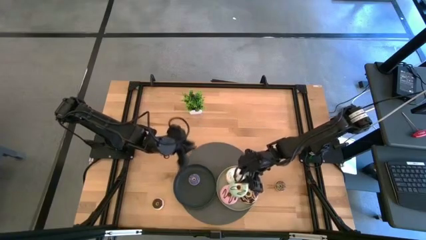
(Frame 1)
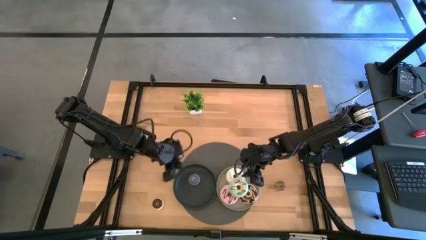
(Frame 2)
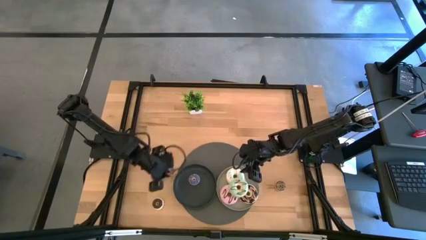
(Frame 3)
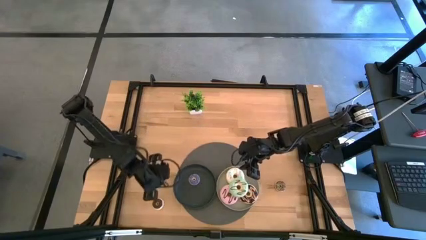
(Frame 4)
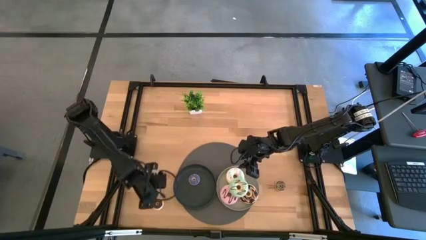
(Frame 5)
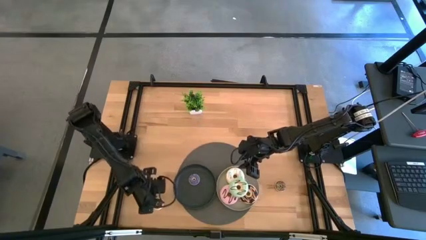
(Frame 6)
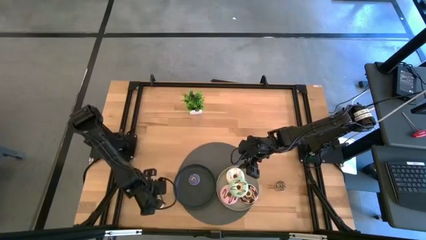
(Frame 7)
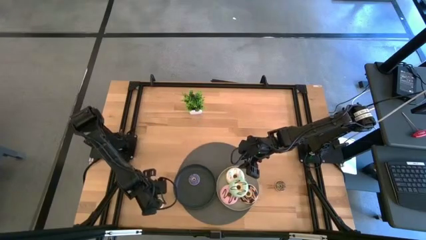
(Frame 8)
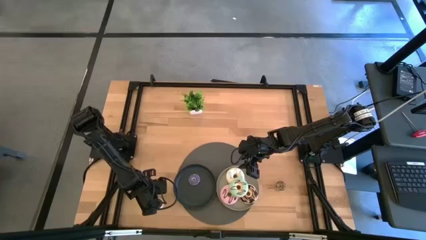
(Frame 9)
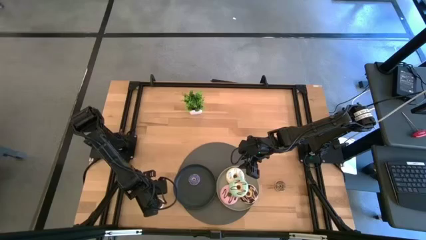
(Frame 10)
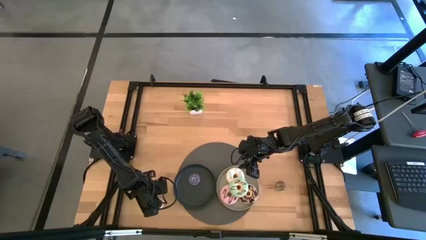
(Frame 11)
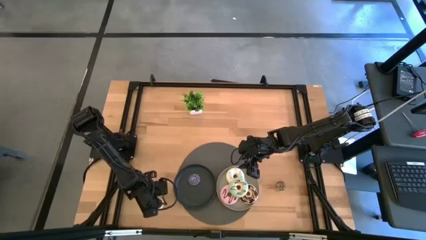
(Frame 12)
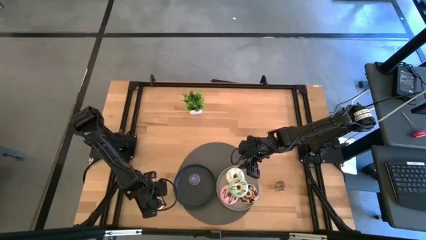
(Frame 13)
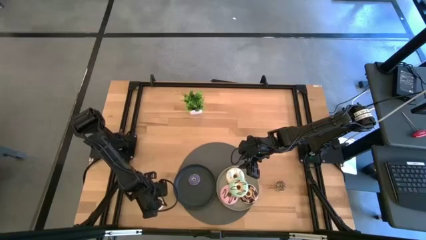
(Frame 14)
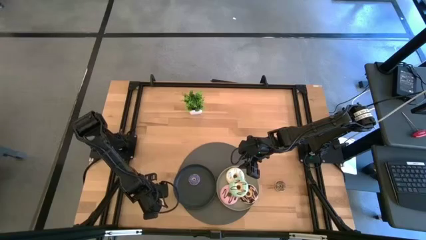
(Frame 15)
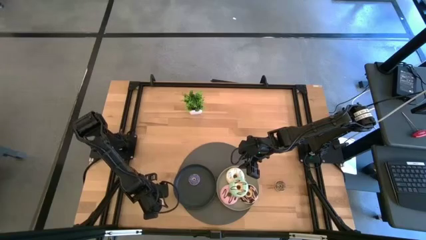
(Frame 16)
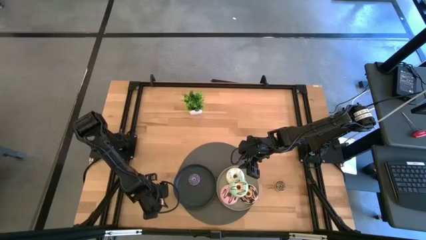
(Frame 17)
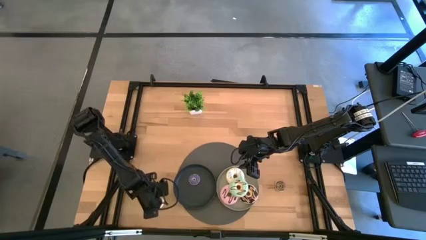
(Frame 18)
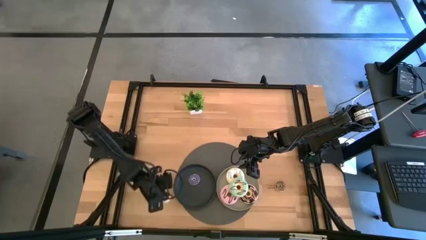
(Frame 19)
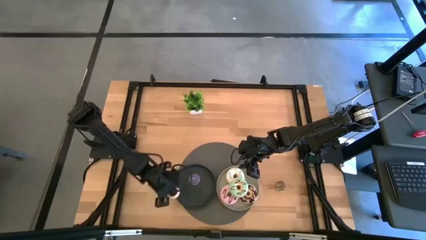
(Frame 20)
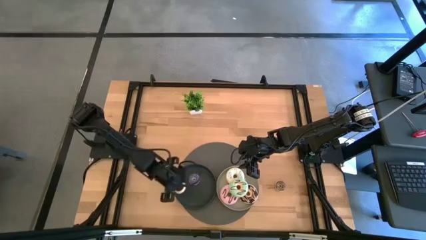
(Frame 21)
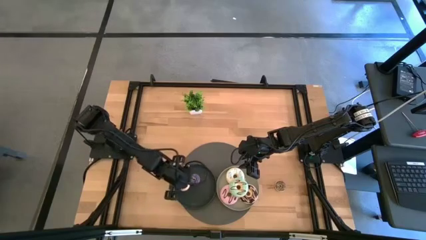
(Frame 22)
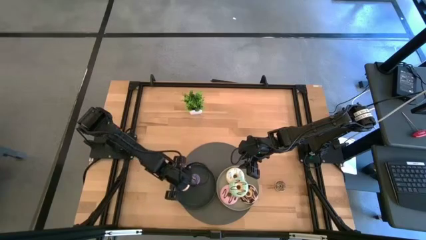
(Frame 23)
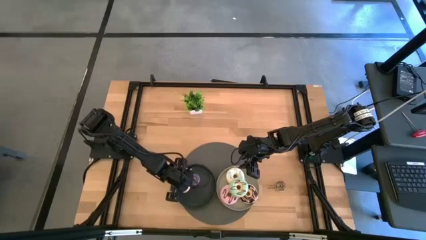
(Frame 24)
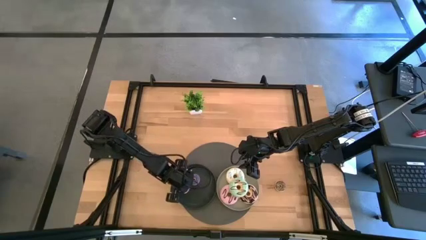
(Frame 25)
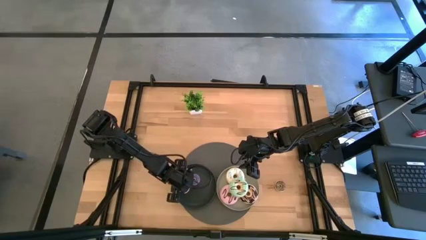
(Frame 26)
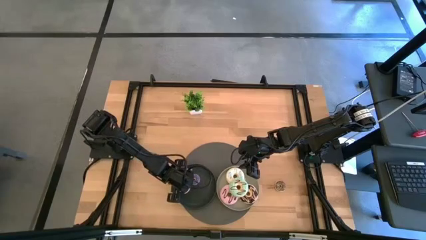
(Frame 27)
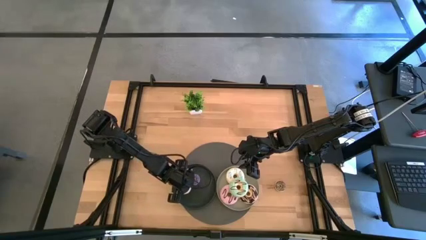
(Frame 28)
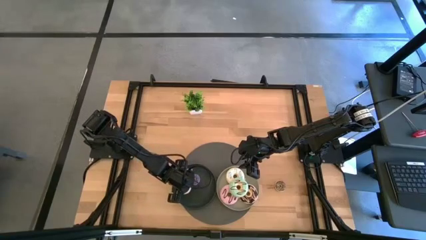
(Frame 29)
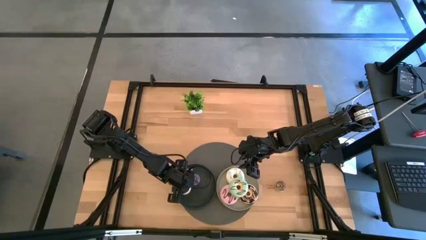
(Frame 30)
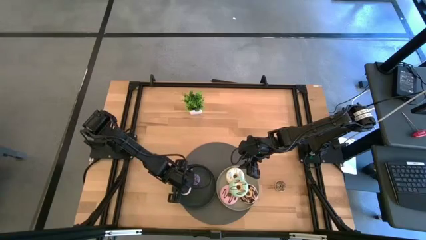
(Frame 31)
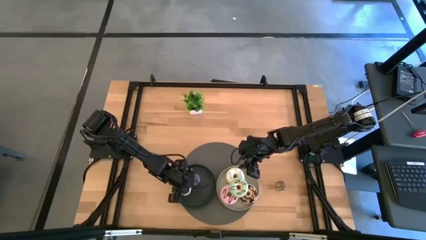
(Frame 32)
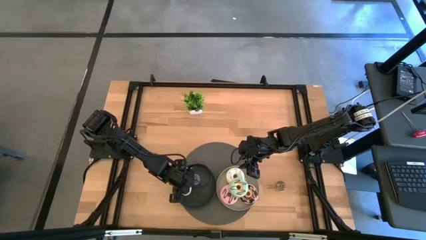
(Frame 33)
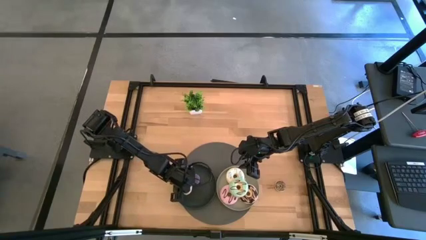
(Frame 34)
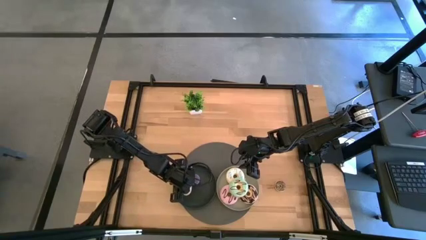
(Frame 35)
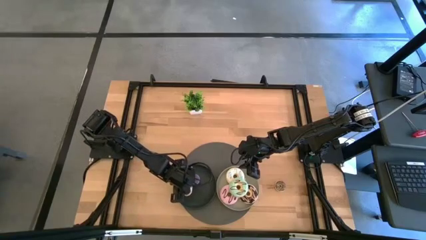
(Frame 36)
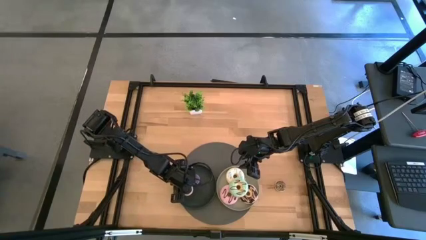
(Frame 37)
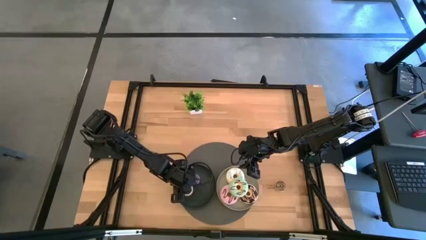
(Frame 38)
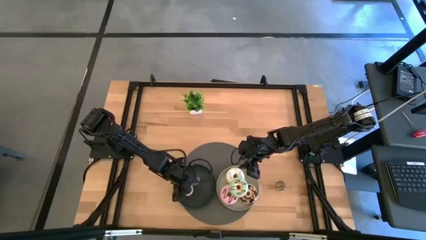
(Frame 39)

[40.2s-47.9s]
Task: Pick & Place donuts
Put the small black donut on the black plate

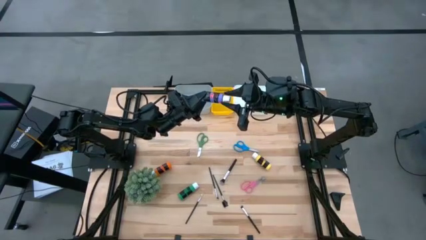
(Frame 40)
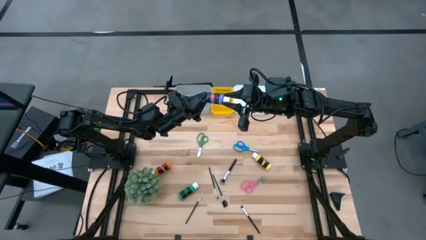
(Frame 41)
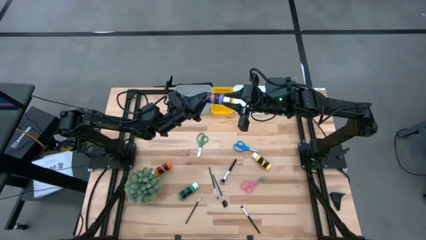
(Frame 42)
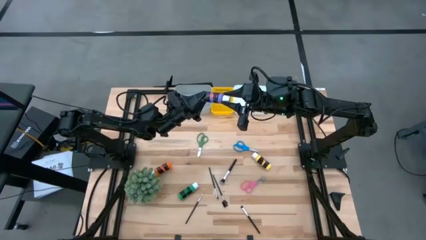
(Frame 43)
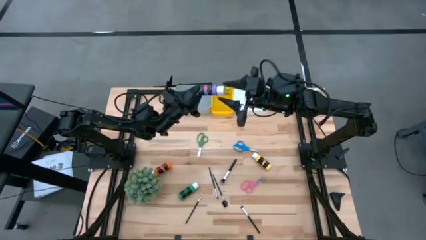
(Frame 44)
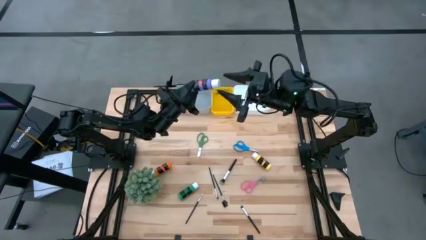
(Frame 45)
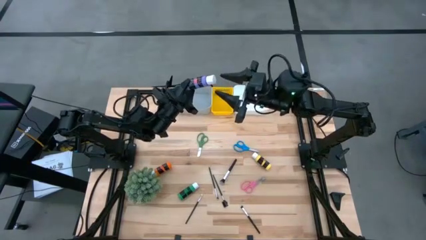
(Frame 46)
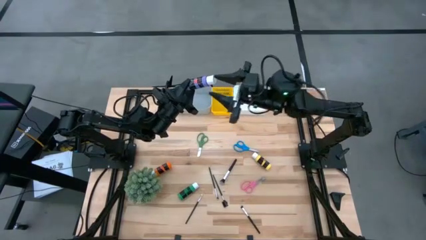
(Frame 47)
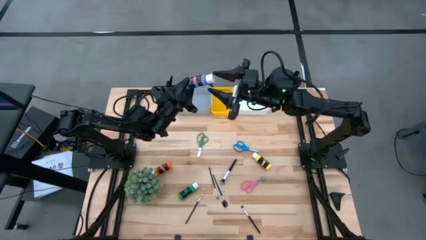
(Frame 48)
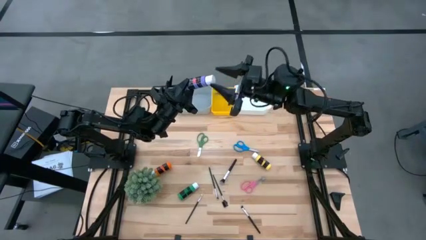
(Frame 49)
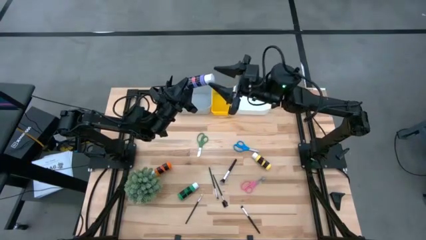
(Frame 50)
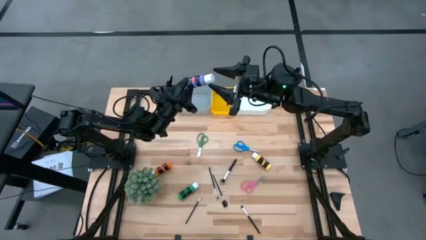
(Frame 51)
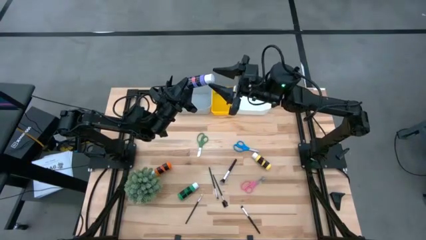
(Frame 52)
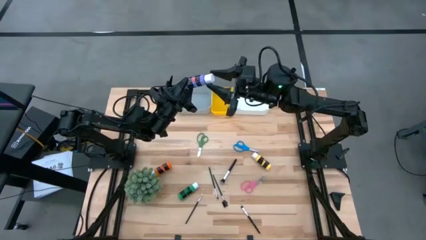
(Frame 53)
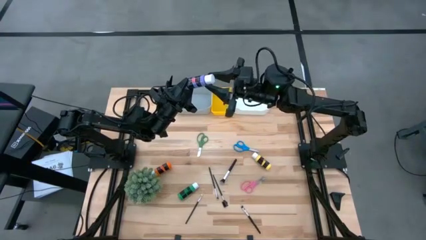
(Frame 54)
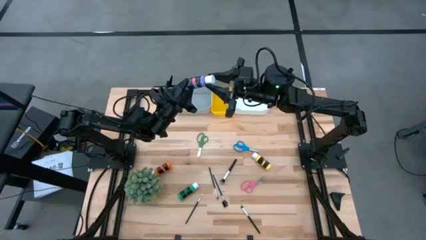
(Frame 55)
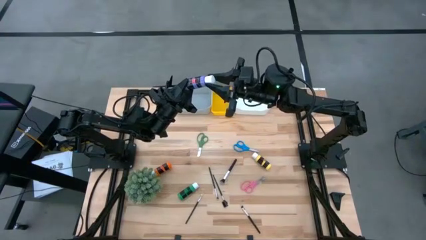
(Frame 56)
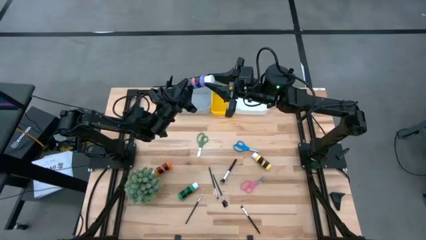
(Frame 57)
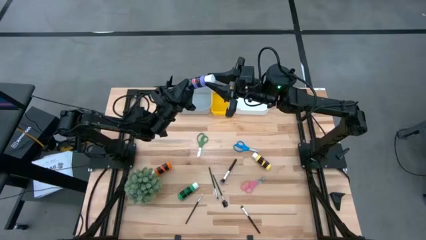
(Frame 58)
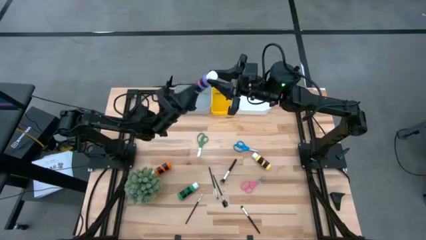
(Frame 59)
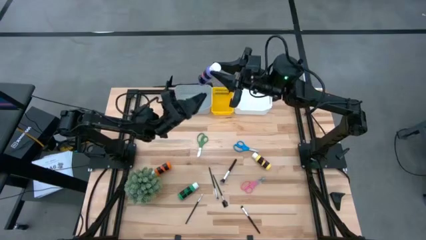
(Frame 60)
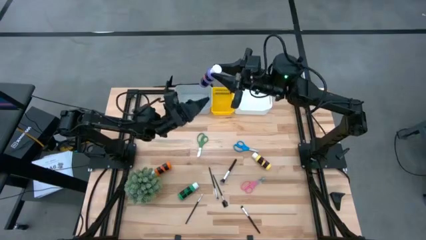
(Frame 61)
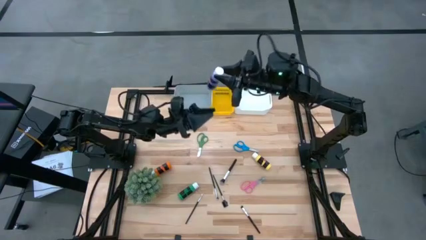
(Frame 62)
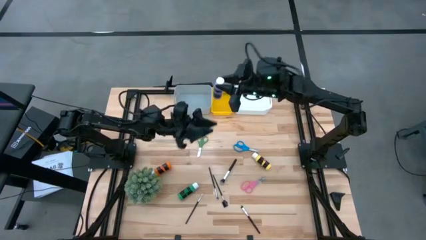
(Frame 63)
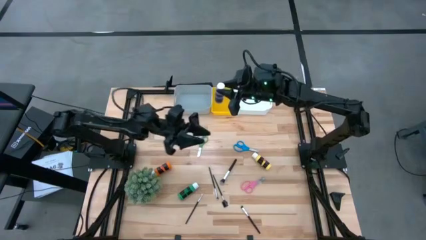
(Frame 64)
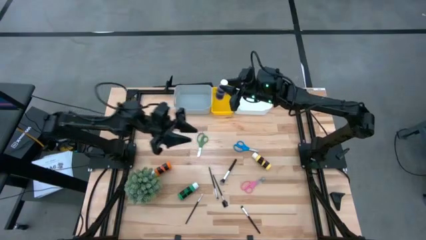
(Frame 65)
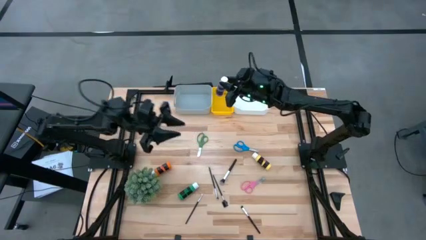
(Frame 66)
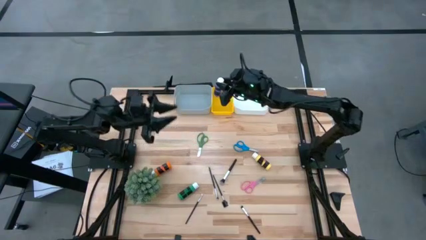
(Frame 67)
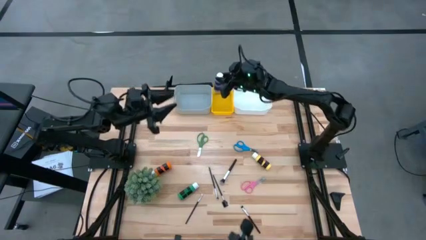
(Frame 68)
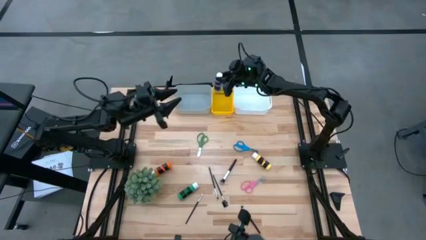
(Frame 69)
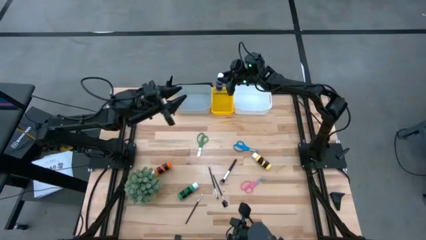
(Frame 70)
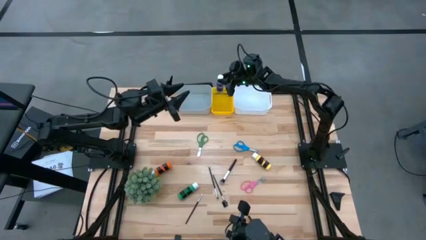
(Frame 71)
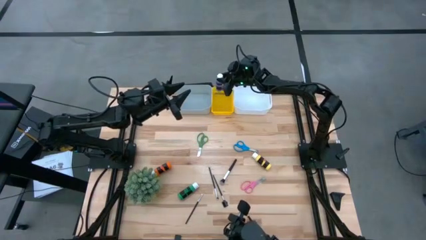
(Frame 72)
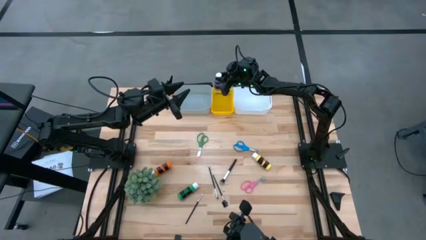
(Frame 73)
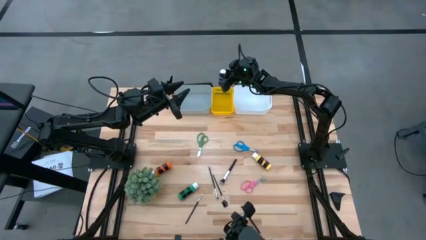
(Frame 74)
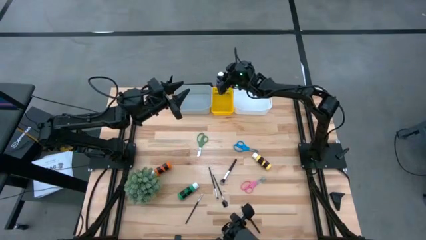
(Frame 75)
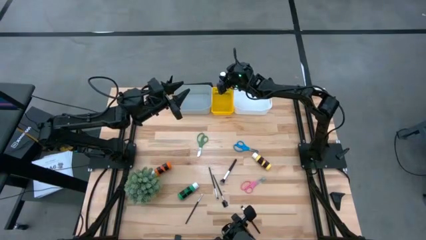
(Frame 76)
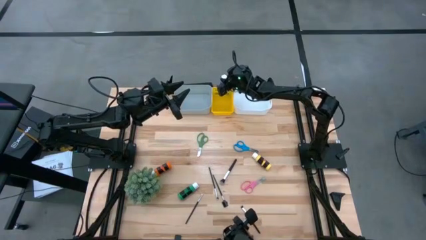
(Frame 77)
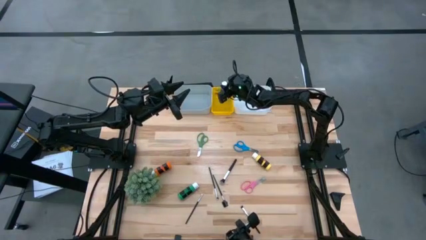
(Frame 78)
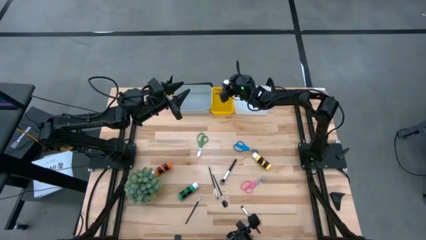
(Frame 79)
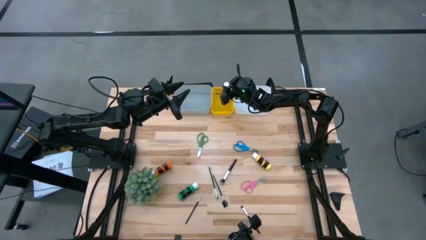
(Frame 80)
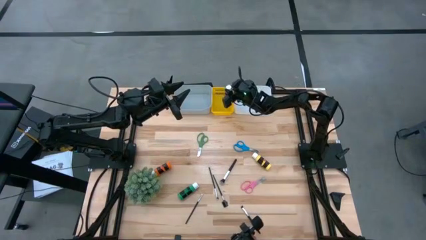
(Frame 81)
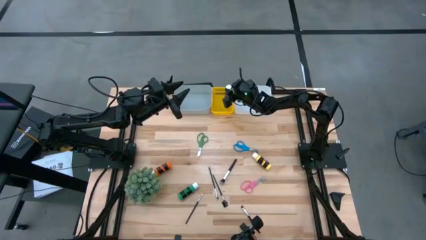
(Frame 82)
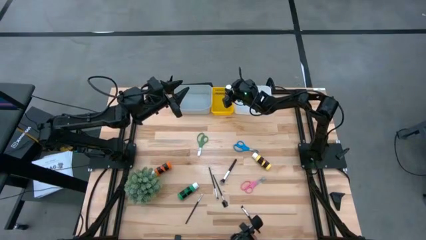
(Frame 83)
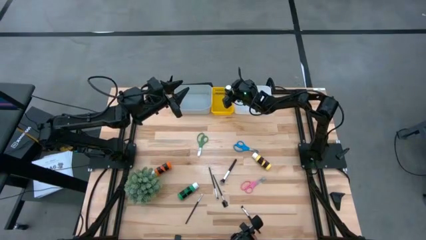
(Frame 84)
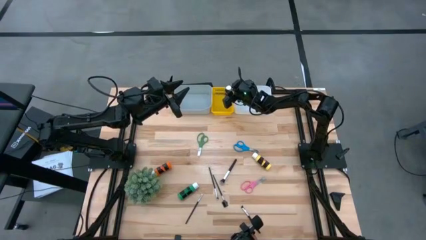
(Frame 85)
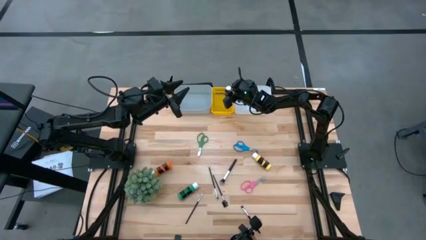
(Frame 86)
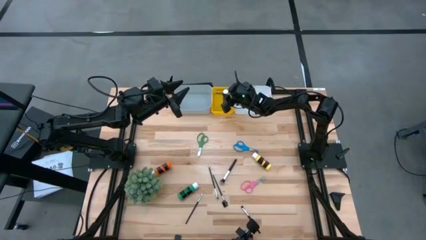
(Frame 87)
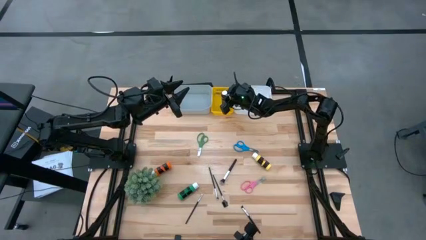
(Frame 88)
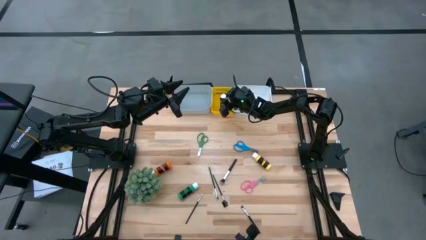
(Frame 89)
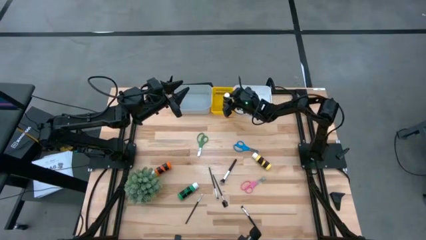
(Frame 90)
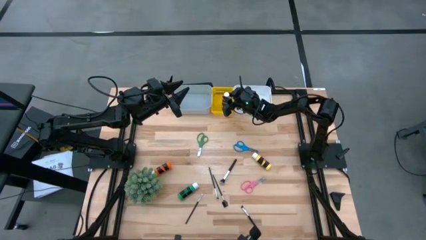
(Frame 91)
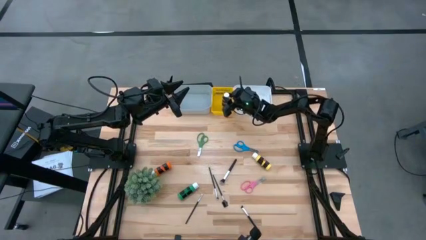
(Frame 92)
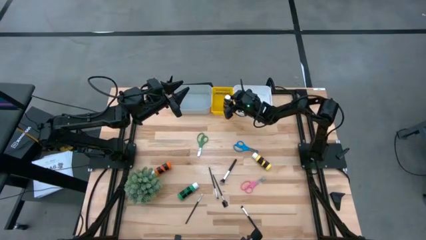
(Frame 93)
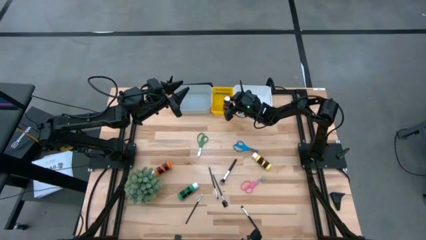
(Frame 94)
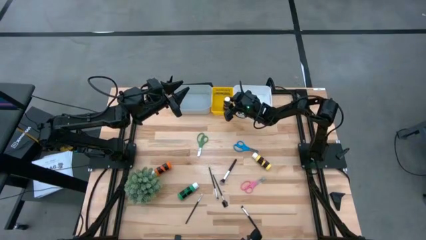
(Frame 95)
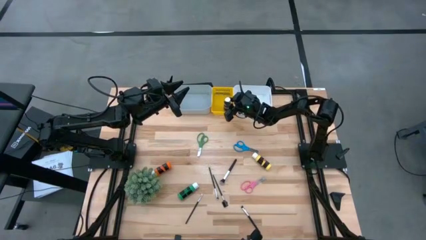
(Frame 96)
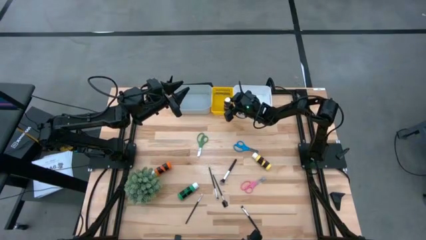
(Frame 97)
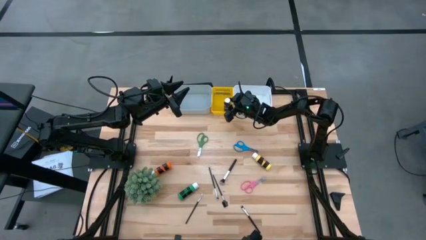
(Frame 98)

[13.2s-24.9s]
Task: Pick & Place Paint Supplies
Put the purple paint bottle into the yellow bin
